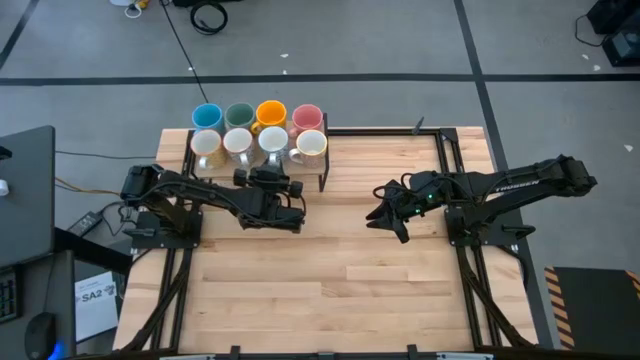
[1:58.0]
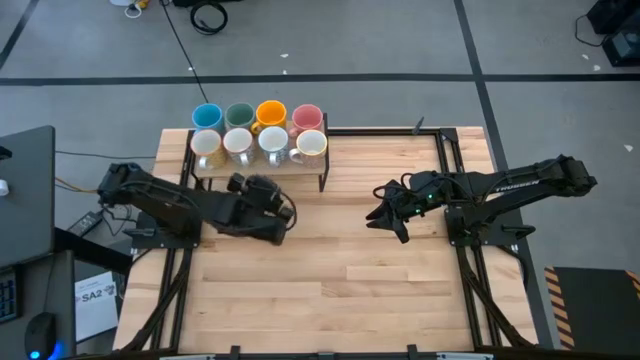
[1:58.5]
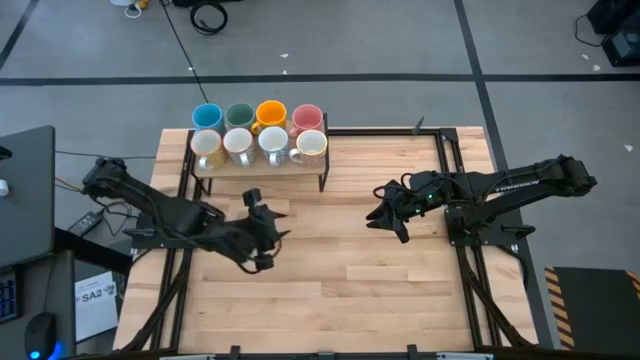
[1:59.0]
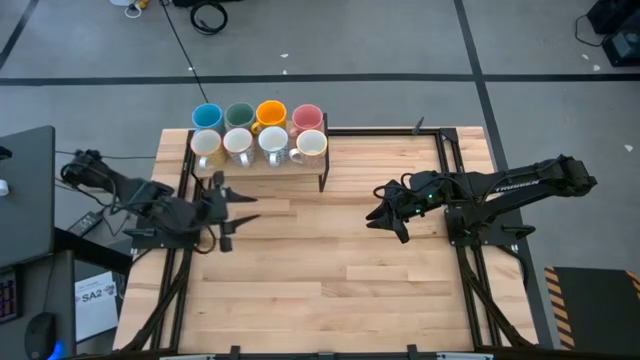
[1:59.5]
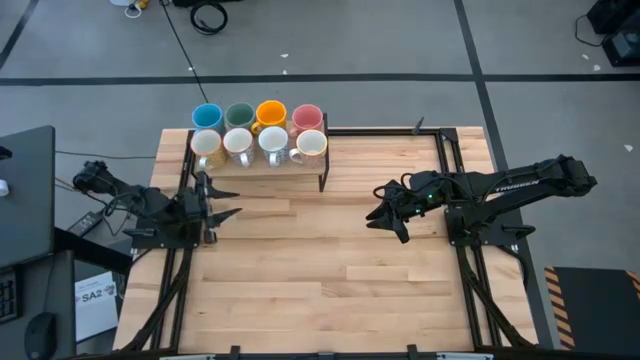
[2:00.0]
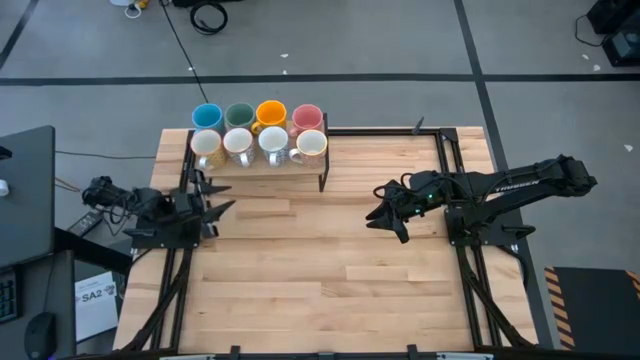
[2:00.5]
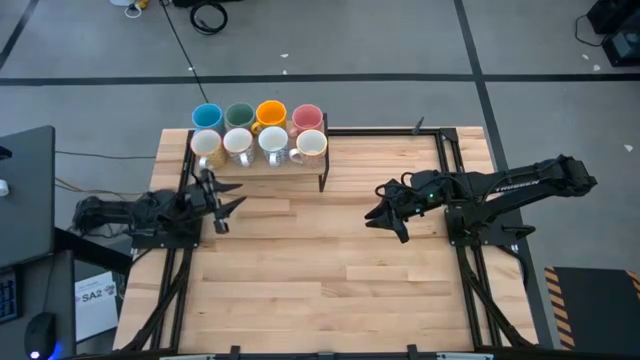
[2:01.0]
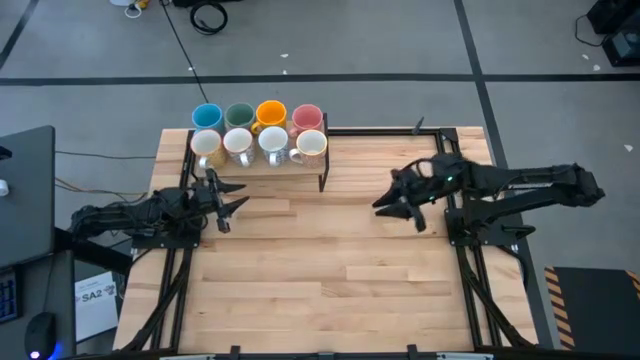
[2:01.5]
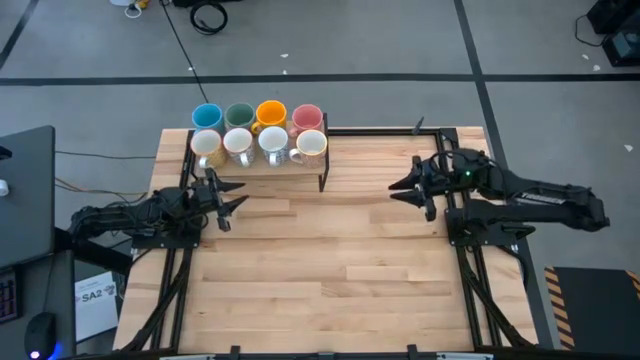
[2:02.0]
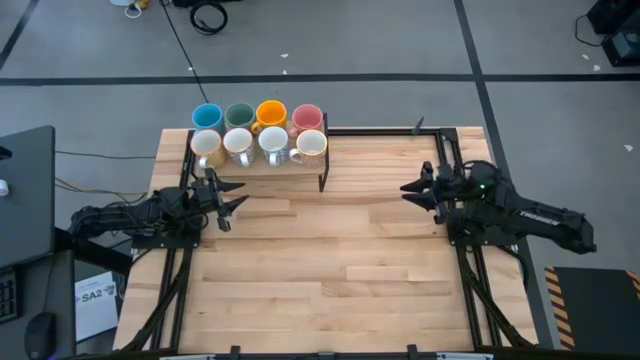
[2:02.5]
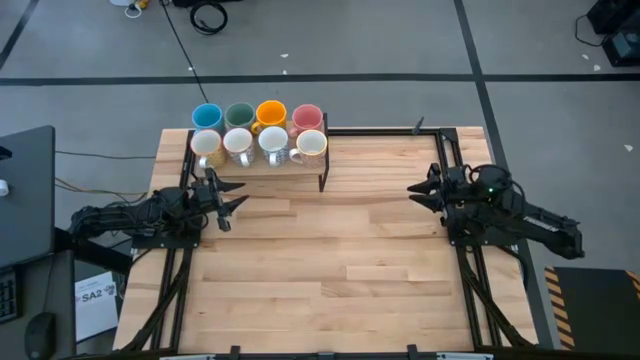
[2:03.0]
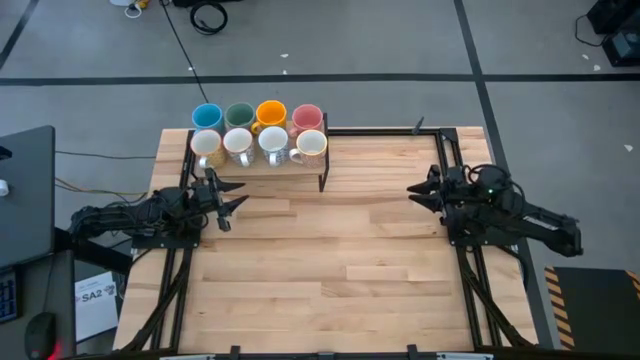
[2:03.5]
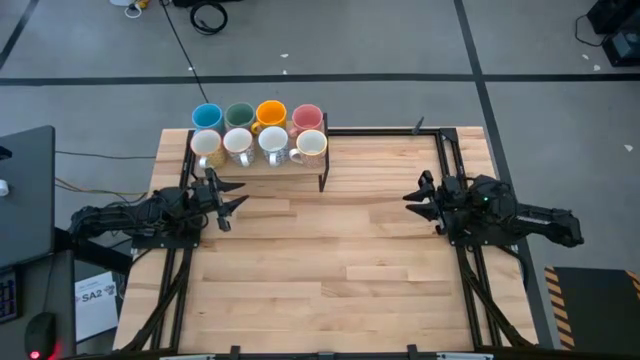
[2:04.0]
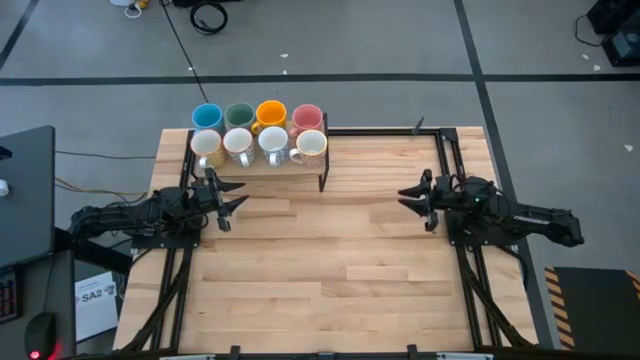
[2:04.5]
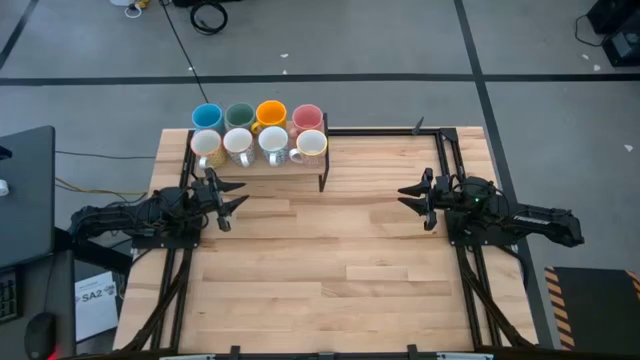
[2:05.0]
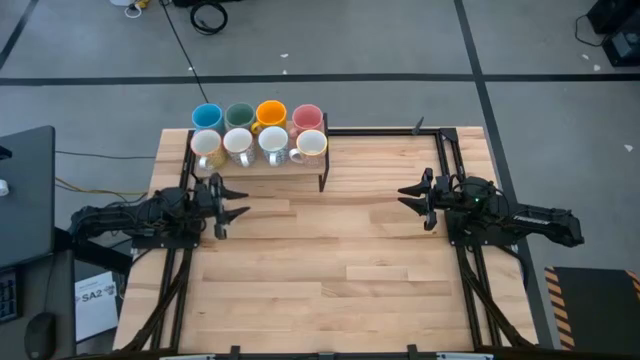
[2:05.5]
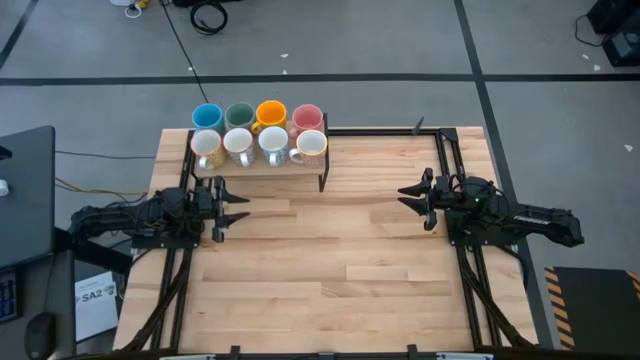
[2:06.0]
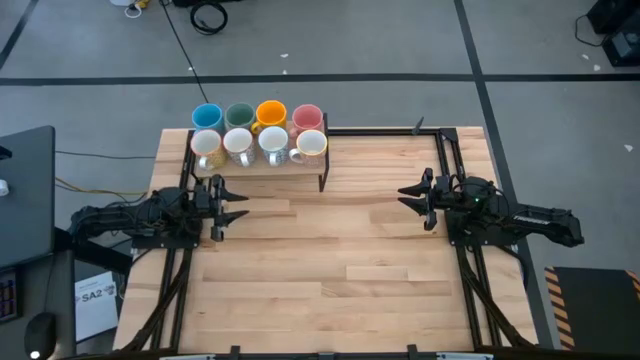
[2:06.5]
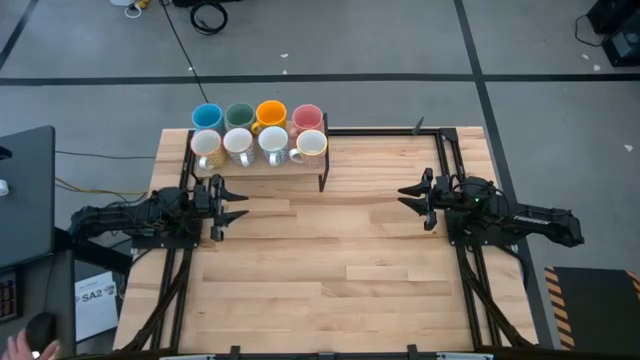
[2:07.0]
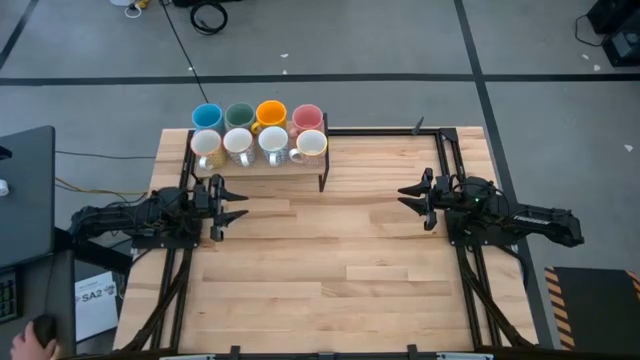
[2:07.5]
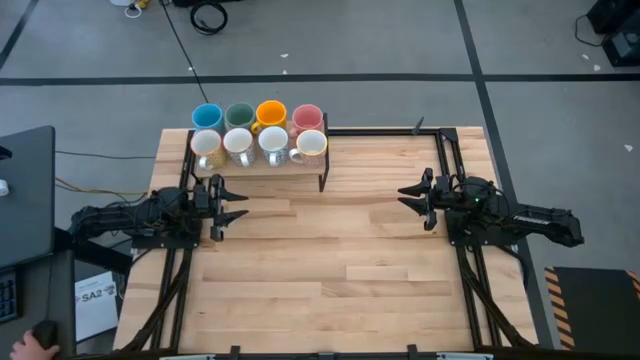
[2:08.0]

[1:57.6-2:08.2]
Task: Place coffee mugs
Return to Home Position

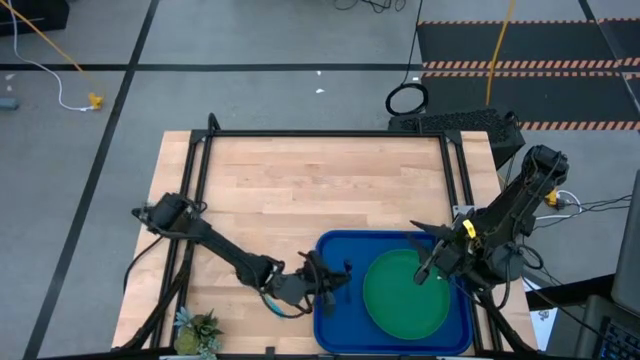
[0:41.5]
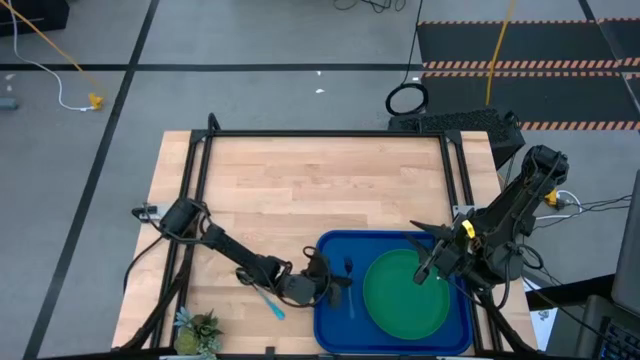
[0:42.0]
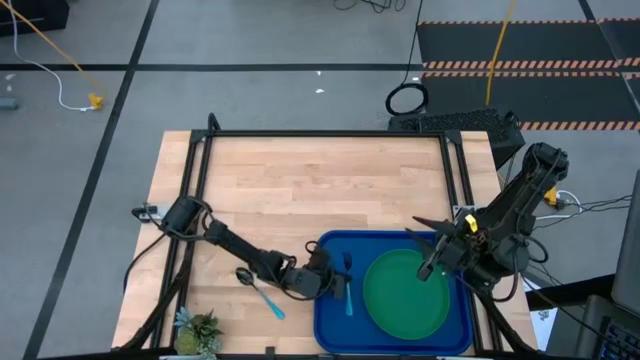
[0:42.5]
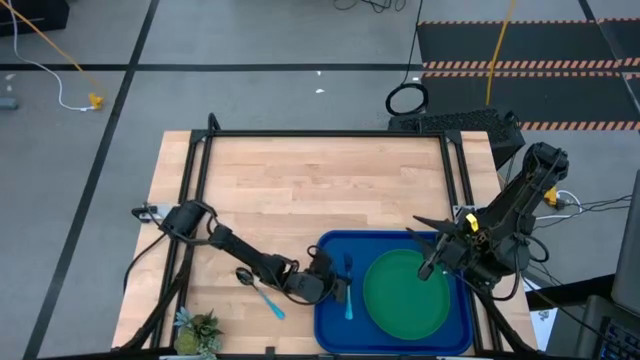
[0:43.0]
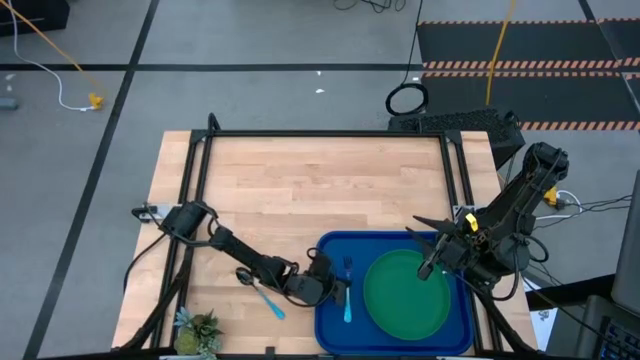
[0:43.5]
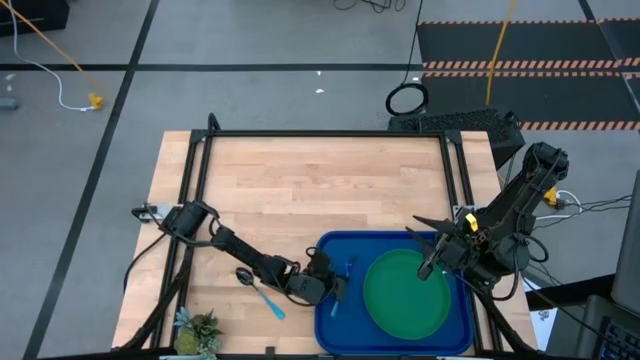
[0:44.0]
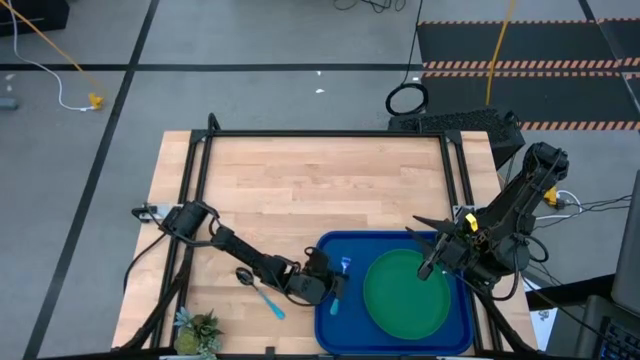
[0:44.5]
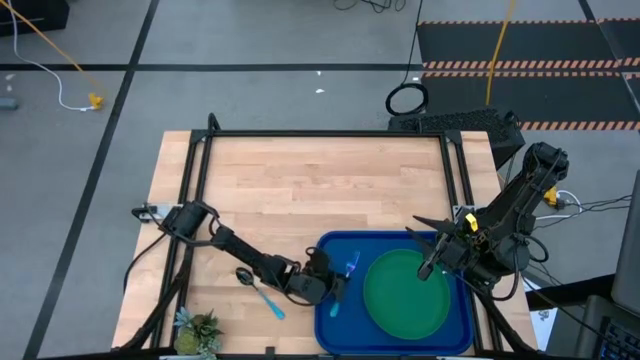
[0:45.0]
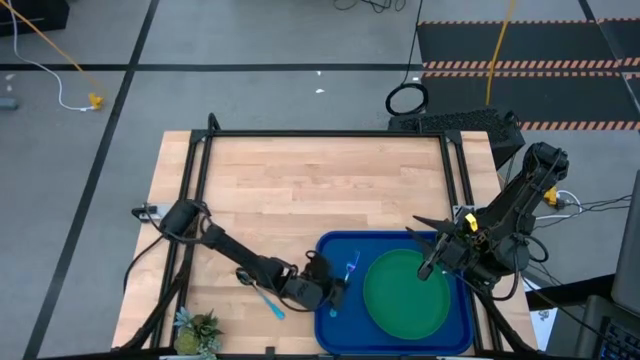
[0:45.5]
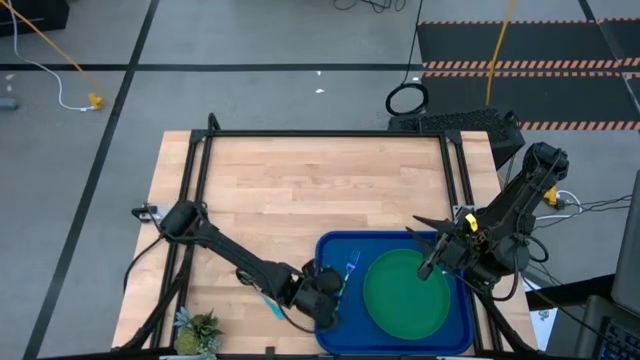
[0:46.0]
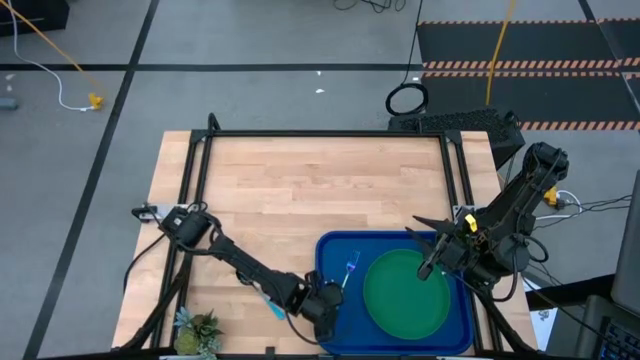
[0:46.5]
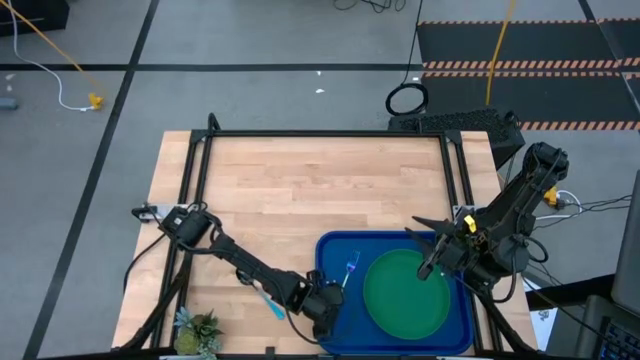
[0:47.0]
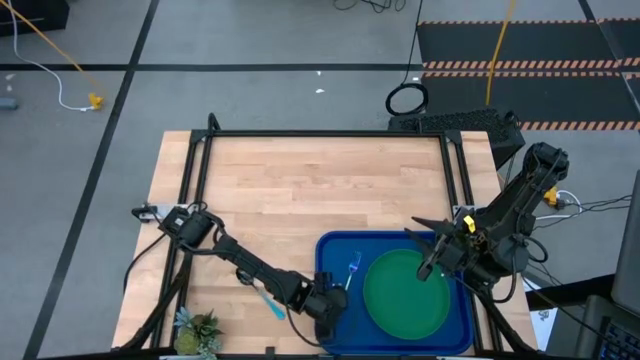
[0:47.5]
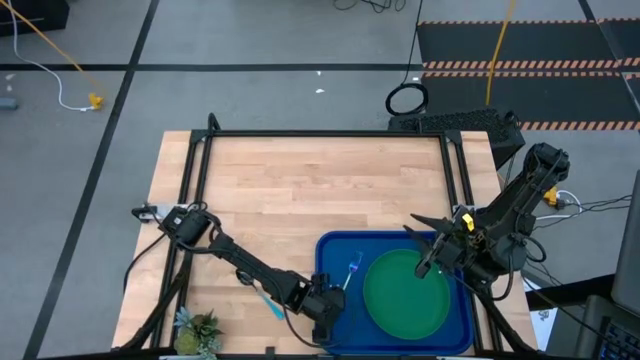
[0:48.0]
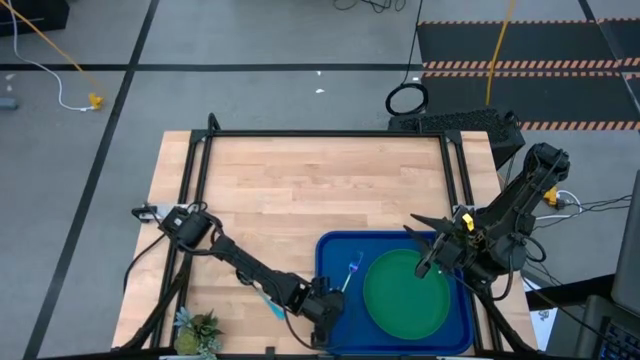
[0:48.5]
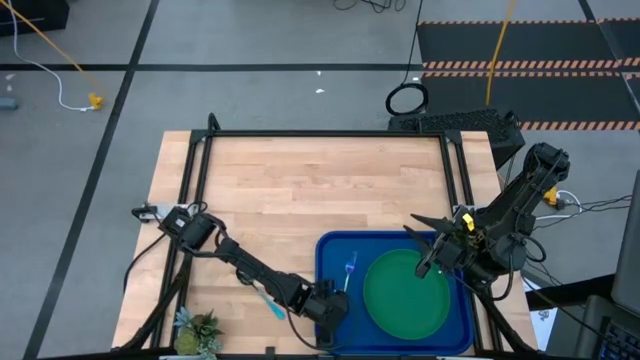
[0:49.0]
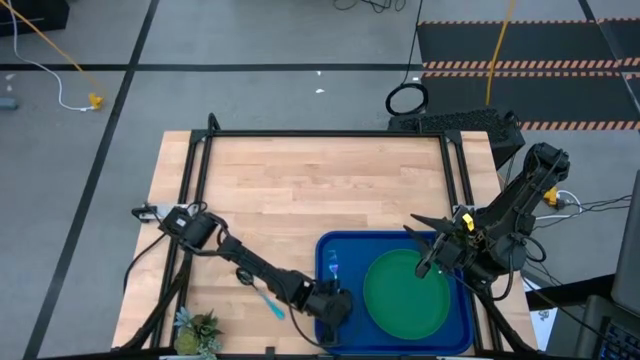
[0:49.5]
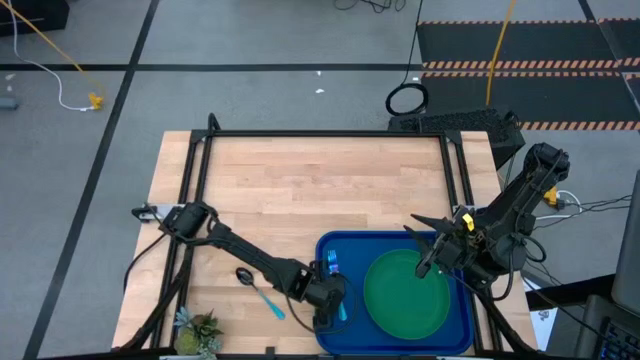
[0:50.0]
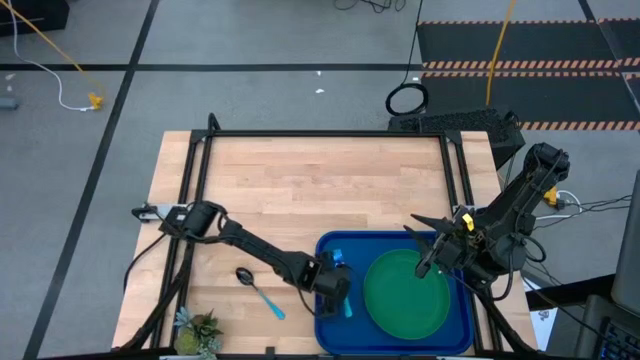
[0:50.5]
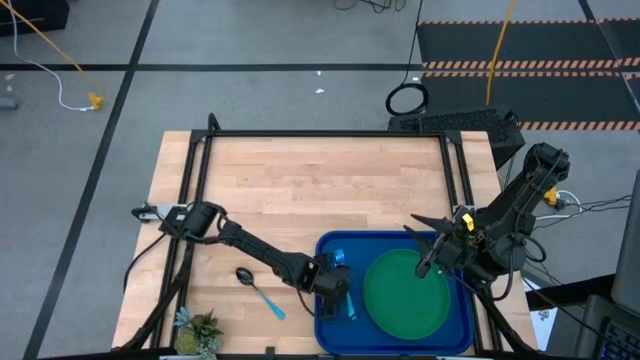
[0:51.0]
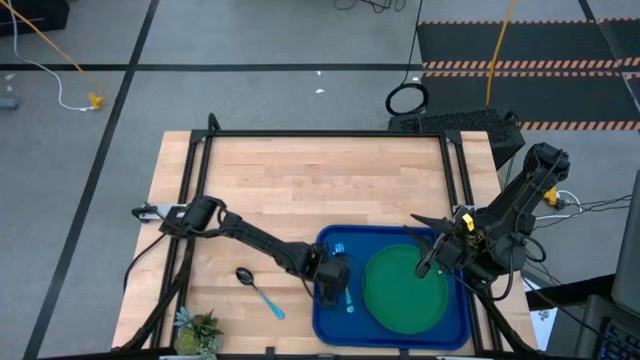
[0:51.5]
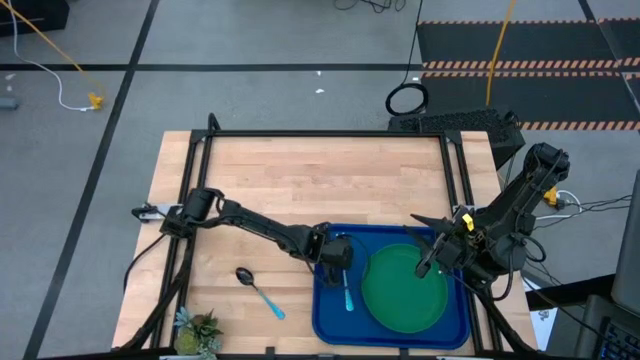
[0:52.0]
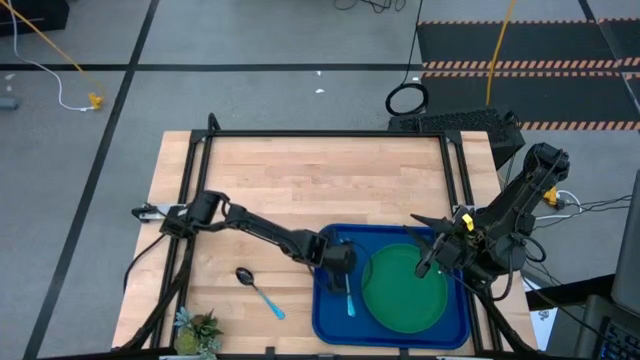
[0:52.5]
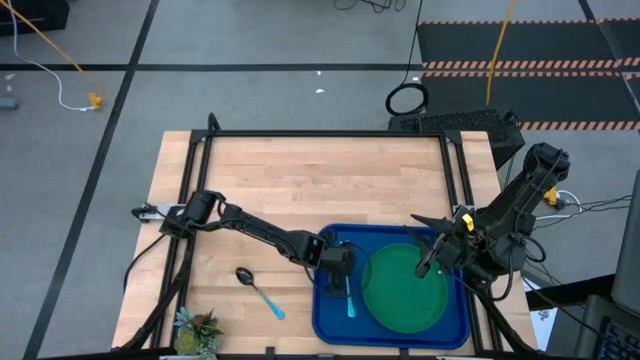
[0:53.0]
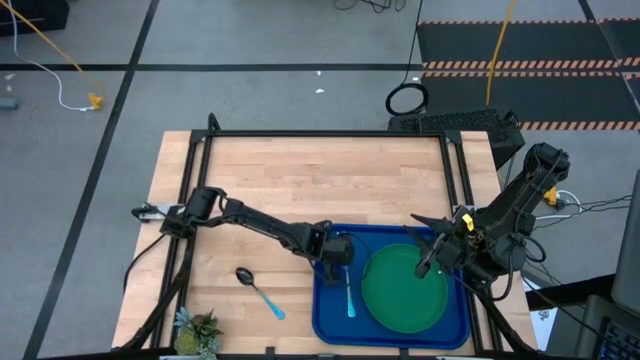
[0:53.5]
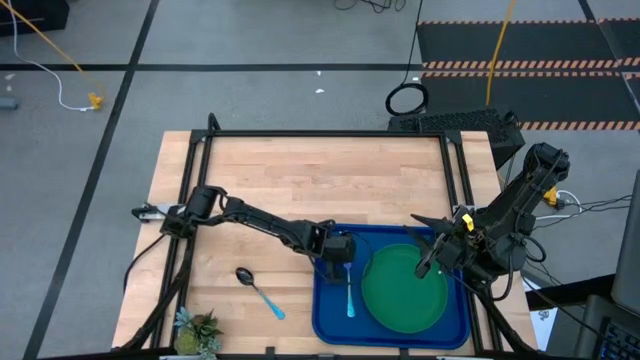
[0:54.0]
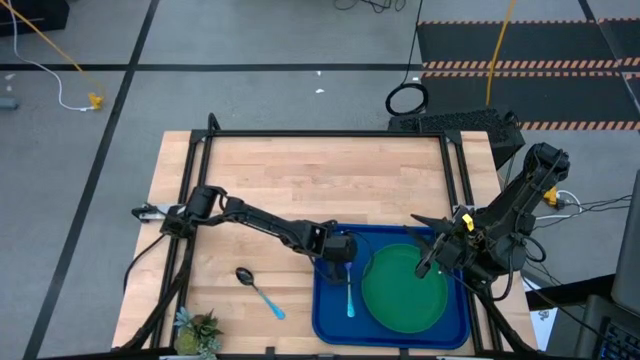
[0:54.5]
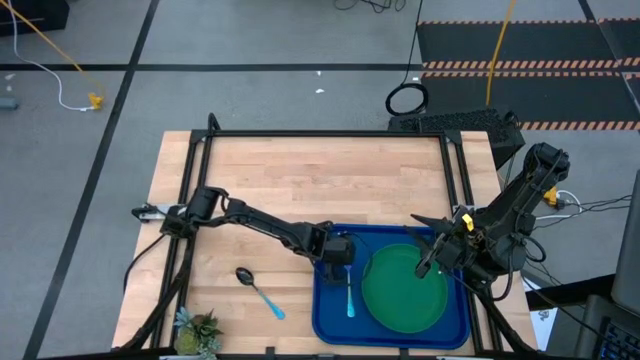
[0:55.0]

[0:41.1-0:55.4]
Task: Pick and place plate/cup/fork/spoon on tray
Put the blue fork on the left side of the plate on the blue tray
